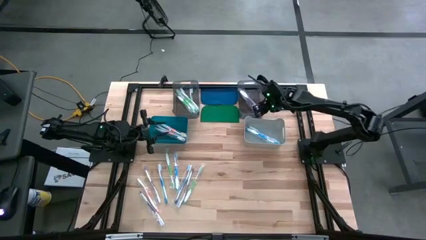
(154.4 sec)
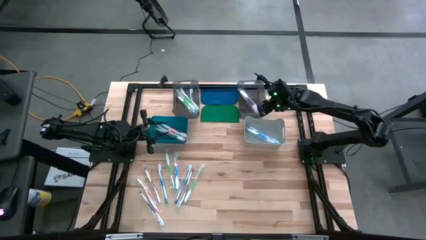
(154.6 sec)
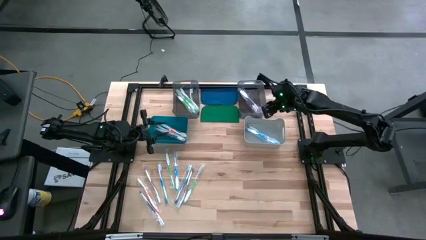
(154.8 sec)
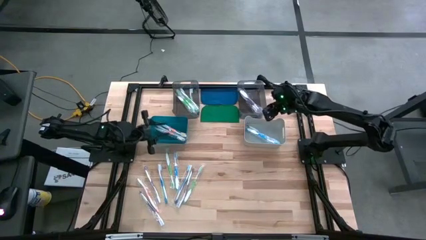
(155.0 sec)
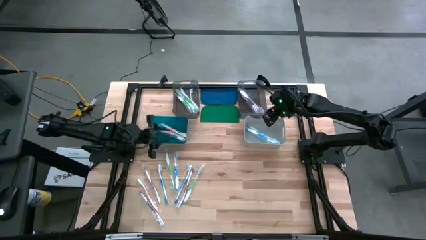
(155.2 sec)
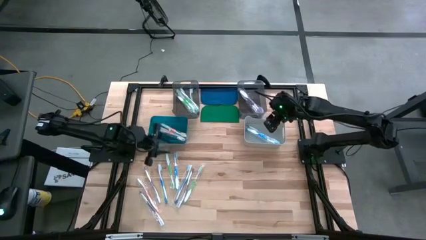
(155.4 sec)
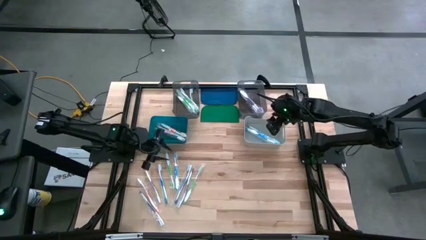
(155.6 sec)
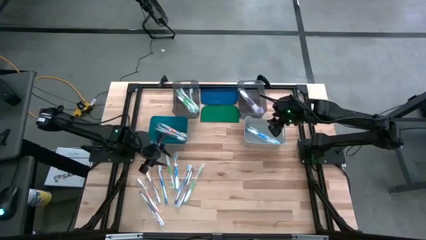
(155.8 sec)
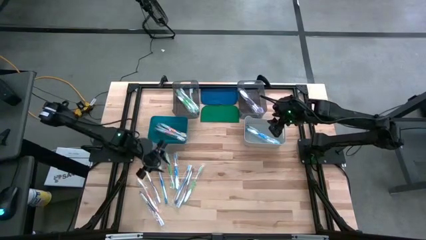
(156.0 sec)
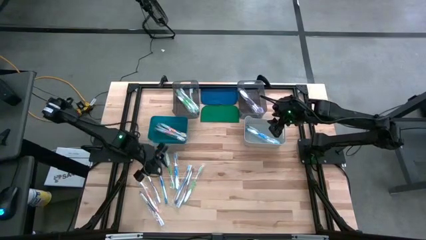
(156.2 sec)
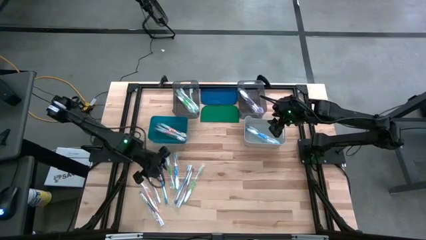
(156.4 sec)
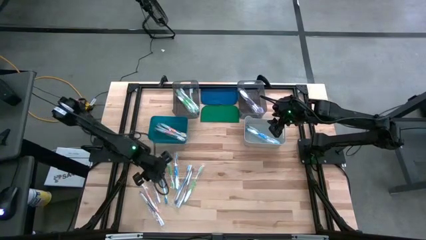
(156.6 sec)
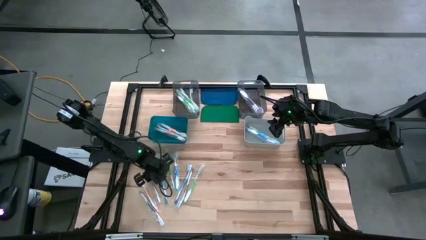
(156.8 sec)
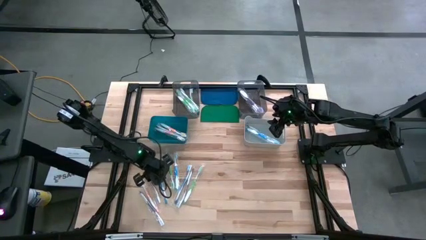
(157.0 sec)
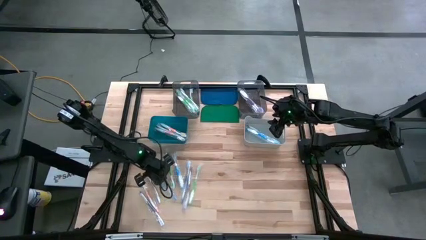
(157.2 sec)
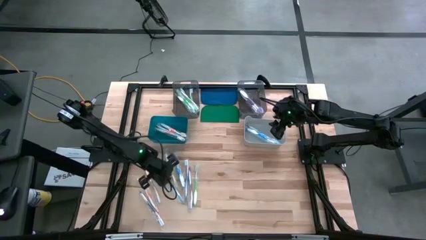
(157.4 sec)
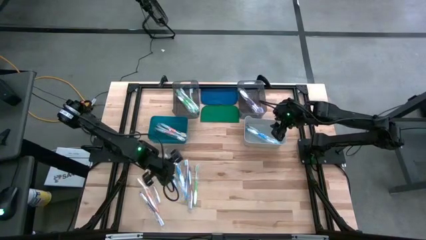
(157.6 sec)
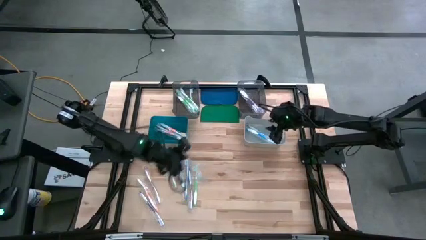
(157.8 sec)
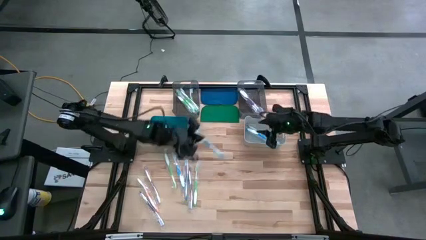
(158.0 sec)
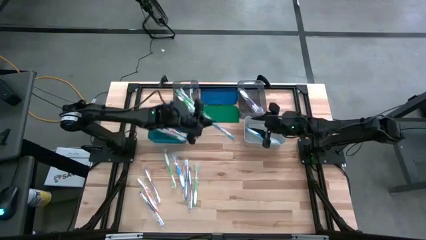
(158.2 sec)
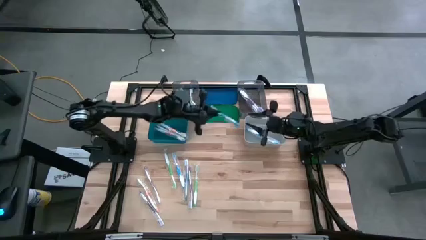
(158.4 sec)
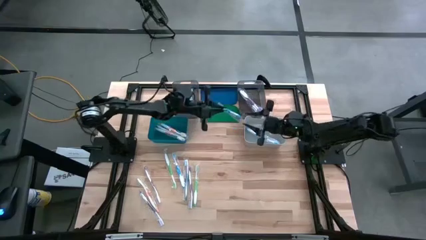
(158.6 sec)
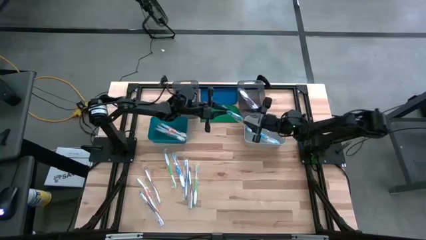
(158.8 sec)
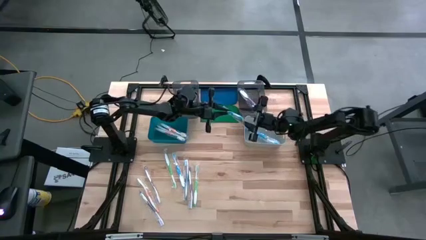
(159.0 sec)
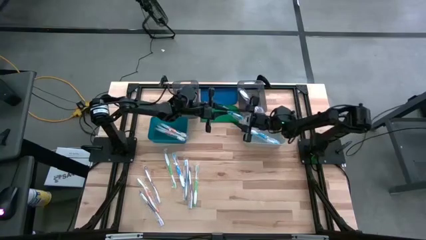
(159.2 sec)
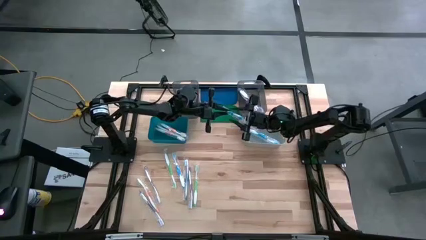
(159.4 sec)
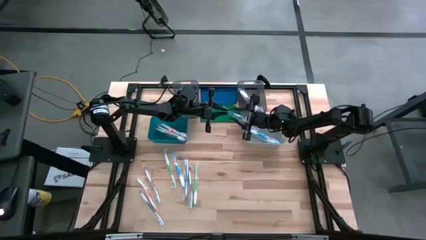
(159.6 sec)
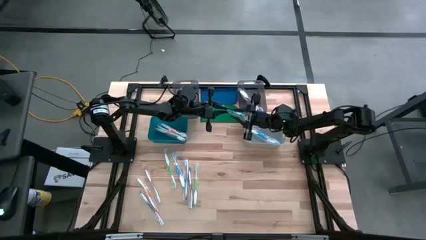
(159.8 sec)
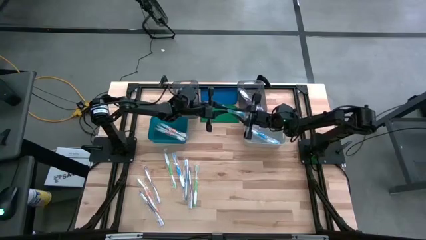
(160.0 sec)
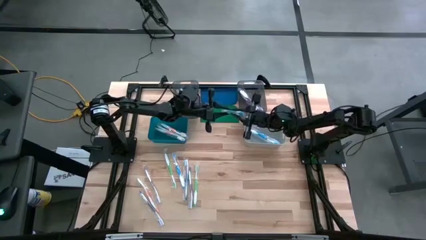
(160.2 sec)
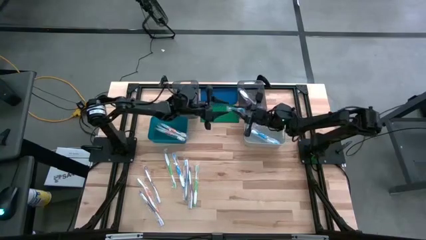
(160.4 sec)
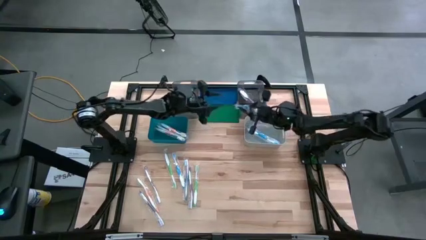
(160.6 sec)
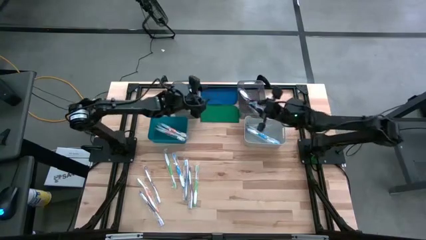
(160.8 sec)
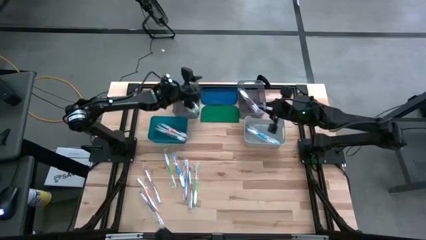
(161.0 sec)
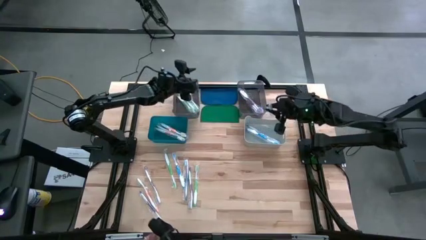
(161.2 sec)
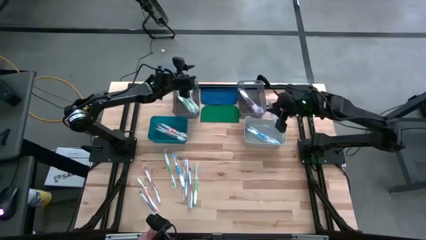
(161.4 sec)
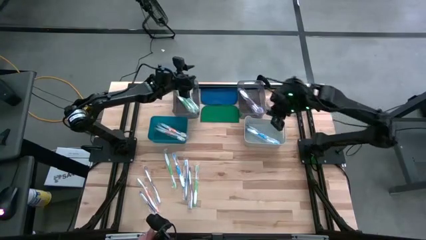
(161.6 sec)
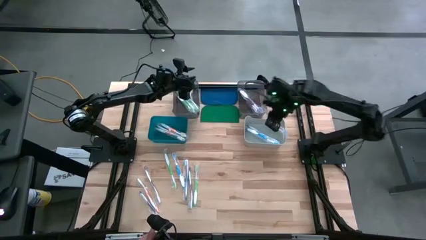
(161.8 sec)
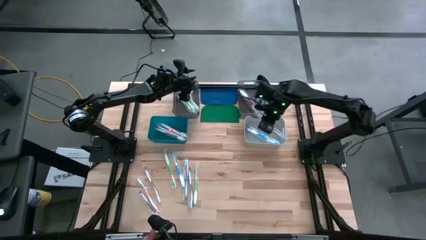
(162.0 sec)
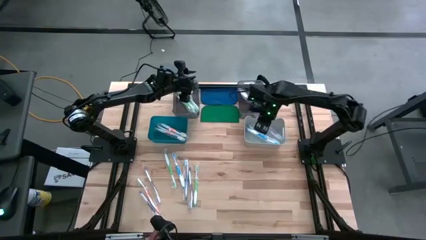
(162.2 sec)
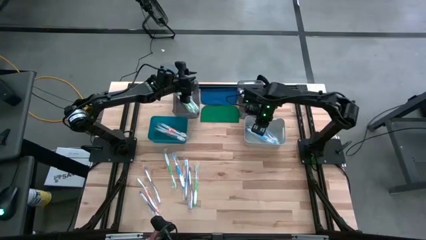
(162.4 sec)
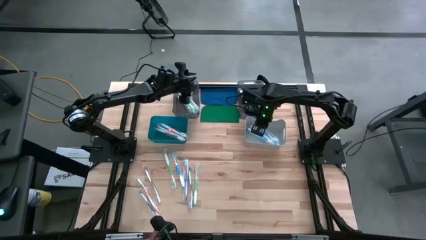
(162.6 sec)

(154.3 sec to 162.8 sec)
Task: Pick & Place Toothbrushes
Put the blue toothbrush into the grey bin

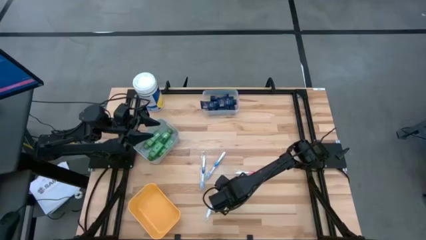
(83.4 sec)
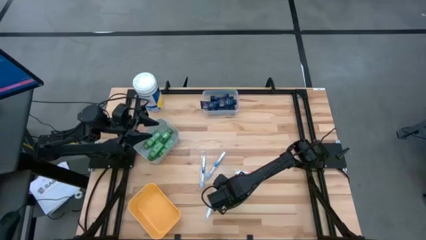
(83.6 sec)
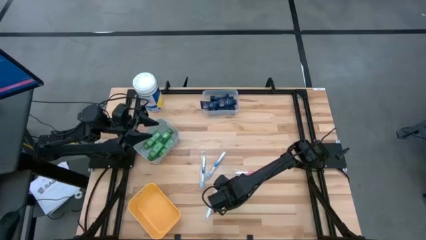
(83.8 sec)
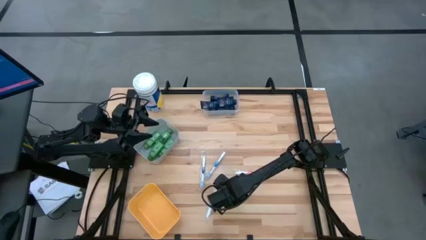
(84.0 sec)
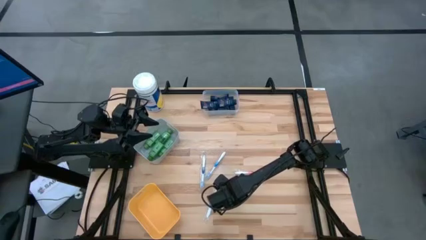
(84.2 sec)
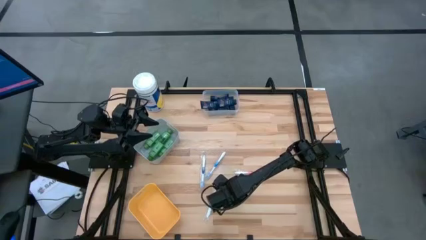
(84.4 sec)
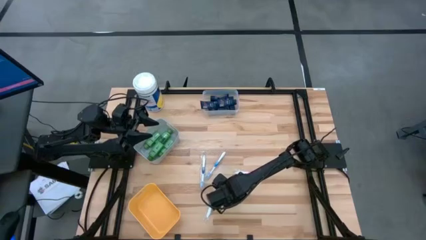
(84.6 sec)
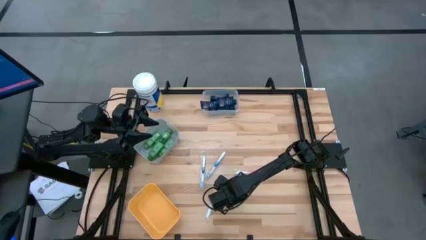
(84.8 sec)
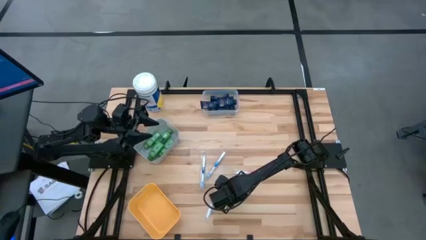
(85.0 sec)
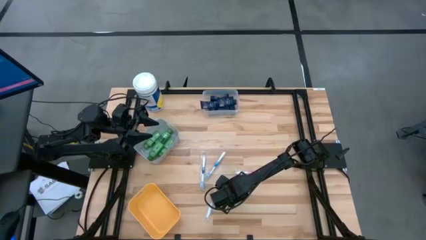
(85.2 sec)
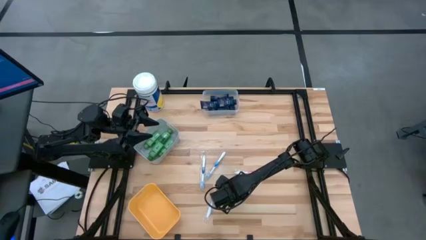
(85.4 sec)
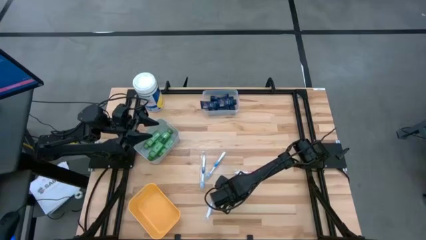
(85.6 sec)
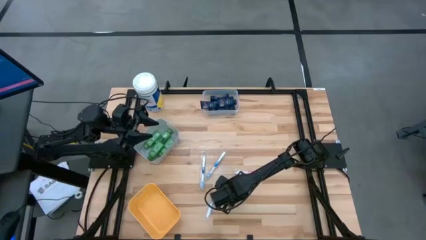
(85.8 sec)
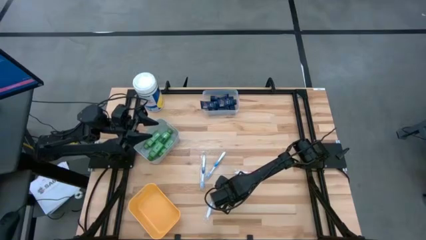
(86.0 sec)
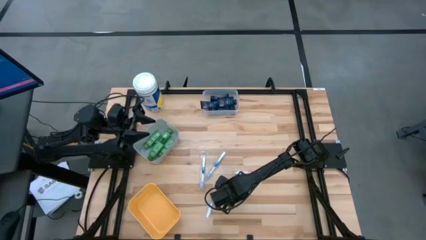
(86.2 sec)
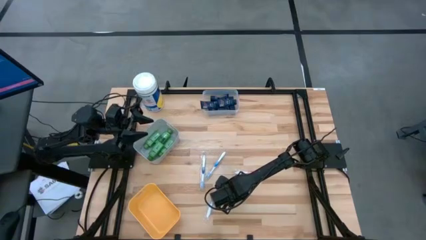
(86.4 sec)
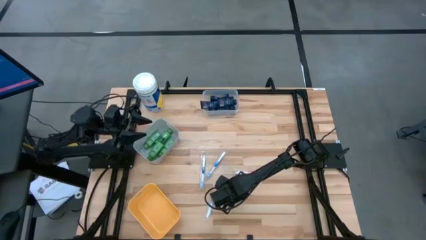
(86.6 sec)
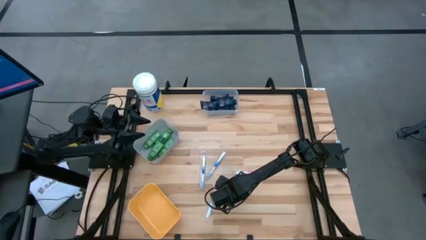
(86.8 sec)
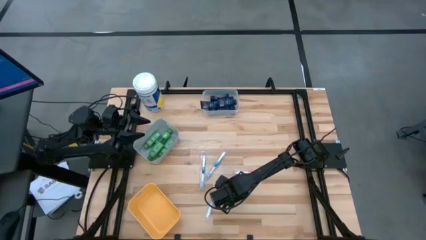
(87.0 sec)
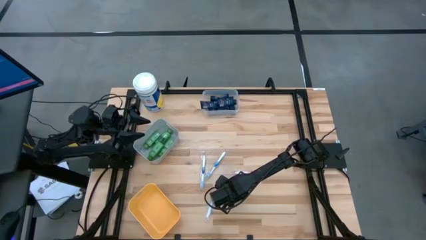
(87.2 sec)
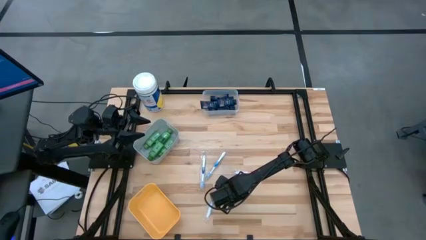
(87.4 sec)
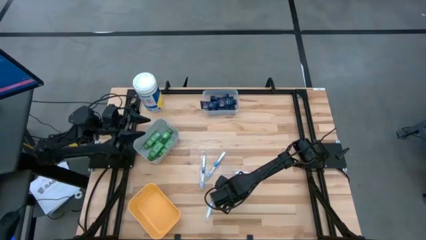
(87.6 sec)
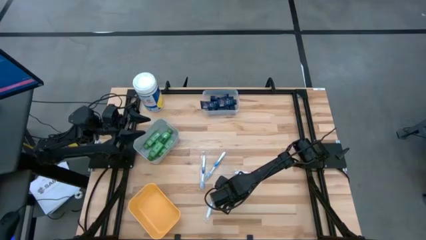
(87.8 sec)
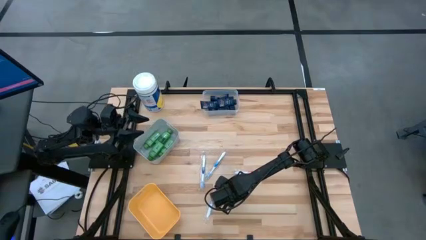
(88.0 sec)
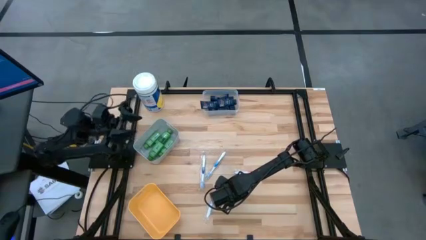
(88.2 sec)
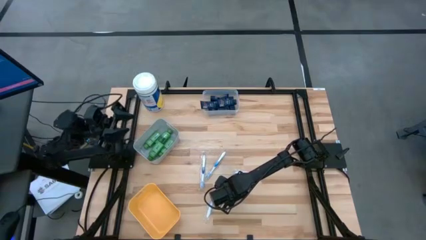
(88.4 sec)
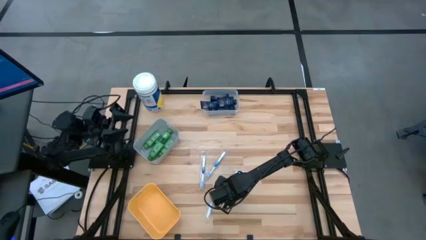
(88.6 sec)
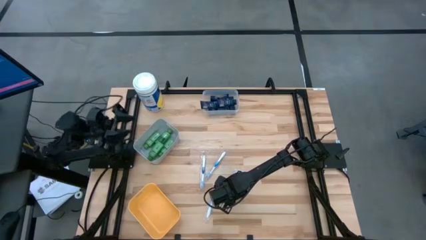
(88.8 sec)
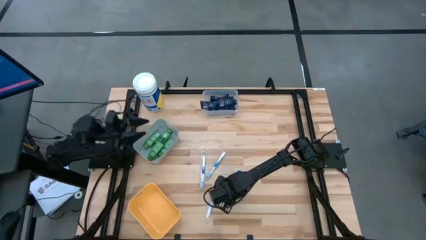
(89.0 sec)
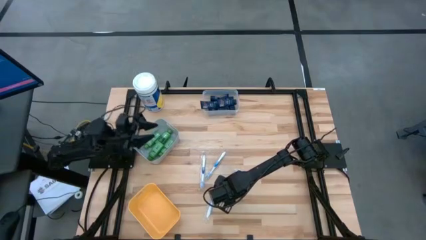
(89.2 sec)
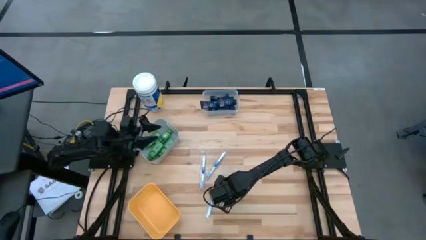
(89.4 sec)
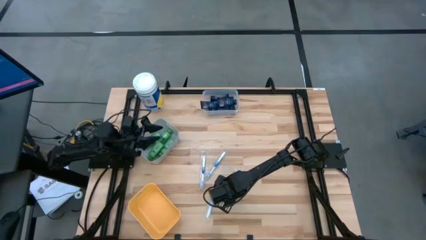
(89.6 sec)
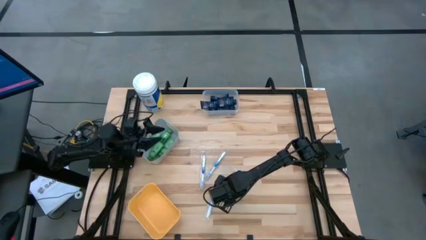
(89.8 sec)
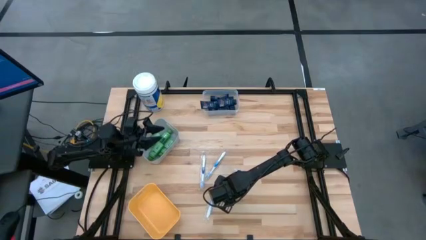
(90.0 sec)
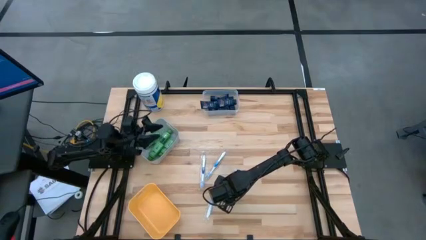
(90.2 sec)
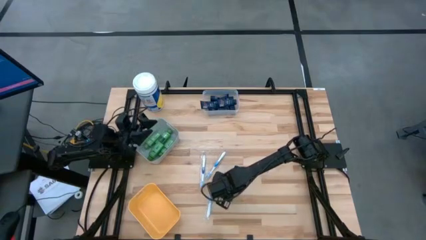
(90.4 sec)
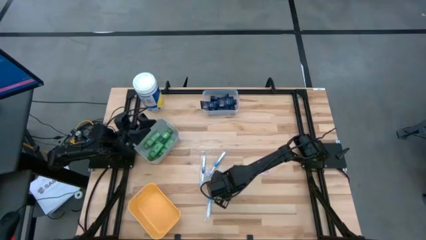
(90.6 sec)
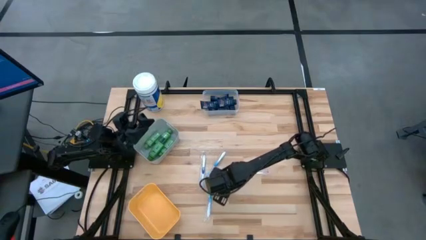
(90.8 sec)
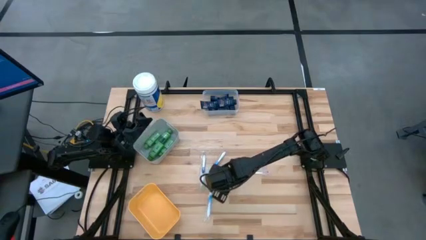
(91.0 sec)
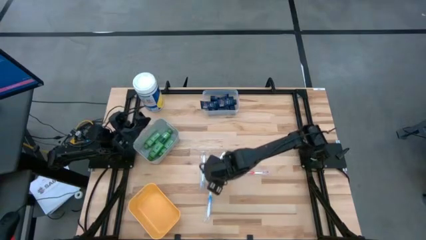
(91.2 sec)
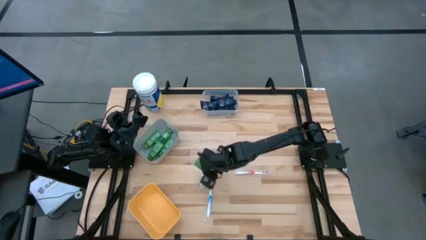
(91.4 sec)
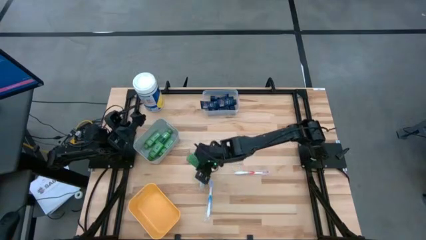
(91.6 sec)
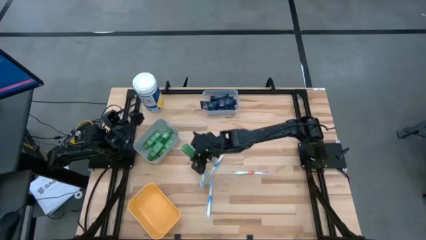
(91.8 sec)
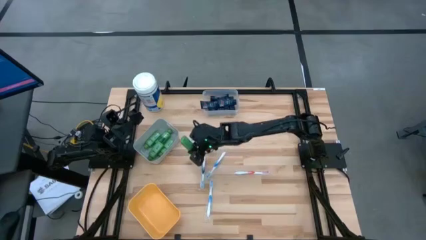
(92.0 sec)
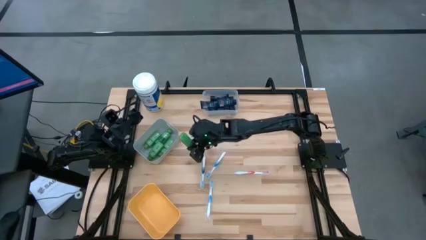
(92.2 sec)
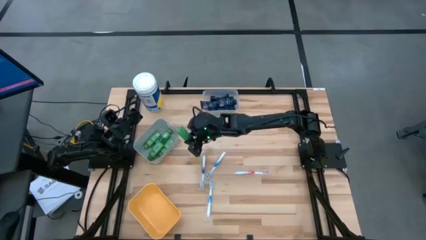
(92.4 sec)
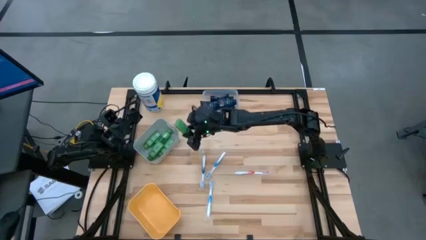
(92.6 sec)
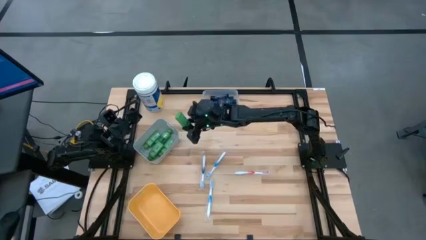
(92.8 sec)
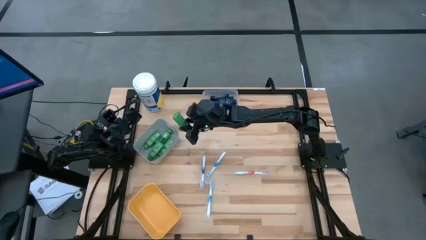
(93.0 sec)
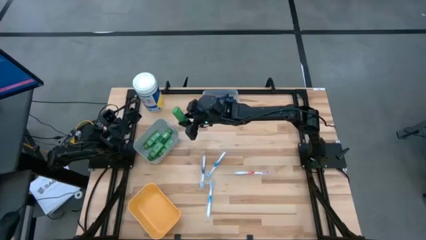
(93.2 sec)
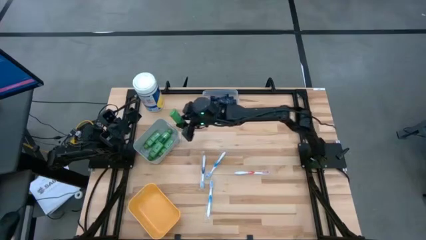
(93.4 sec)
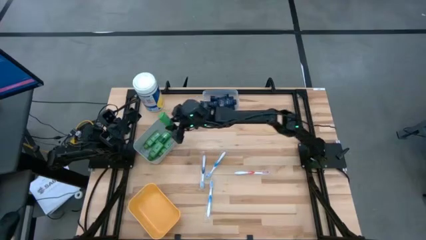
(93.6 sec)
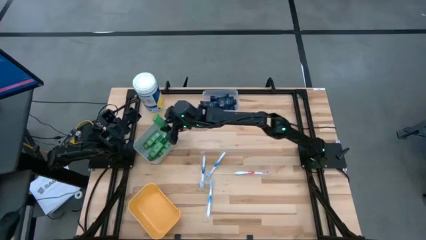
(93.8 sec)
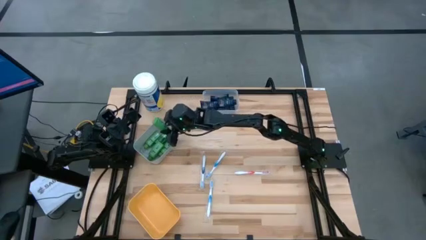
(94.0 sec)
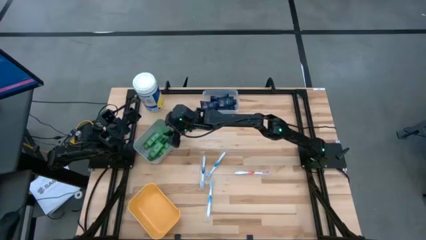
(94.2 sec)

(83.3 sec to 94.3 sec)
Task: Pick & Place Travel size toiletries
Put the green shampoo into the gray bin
